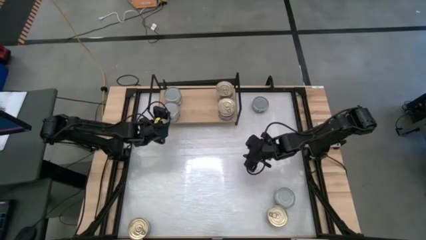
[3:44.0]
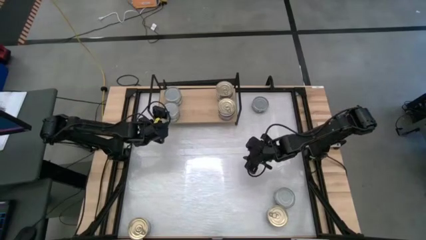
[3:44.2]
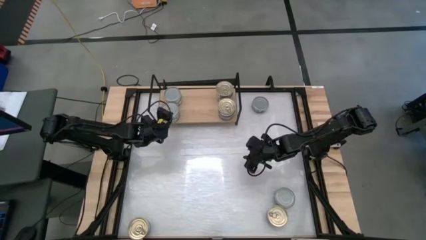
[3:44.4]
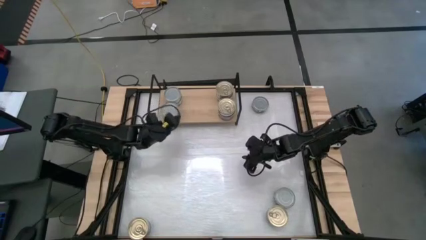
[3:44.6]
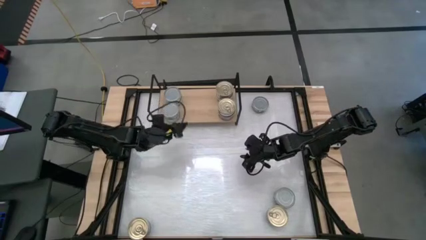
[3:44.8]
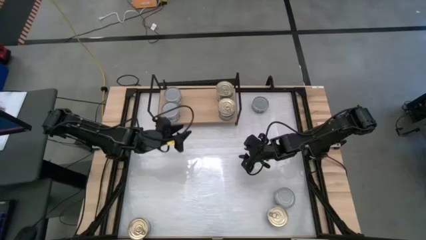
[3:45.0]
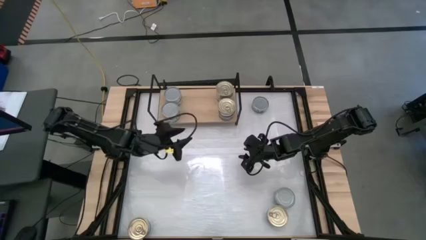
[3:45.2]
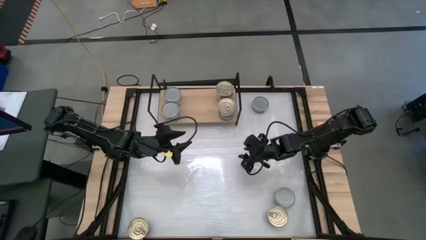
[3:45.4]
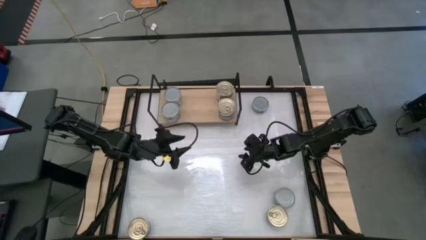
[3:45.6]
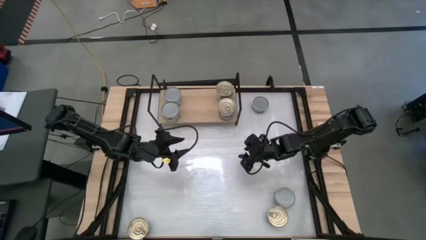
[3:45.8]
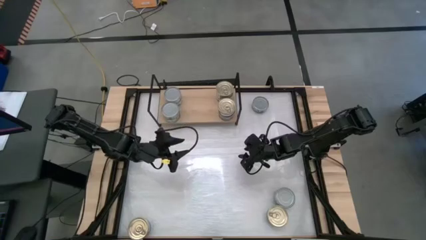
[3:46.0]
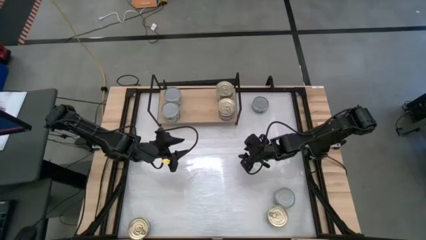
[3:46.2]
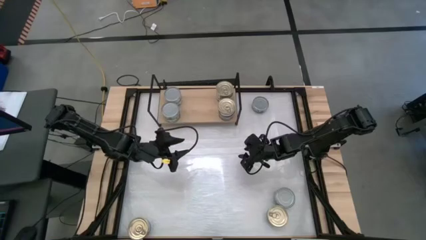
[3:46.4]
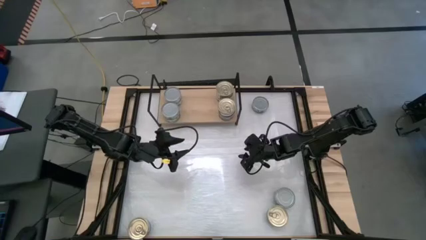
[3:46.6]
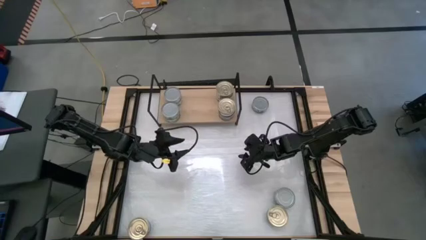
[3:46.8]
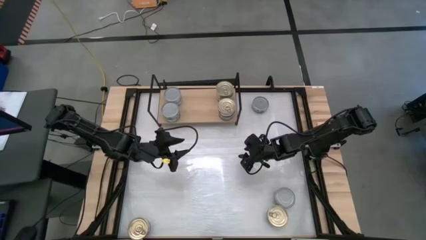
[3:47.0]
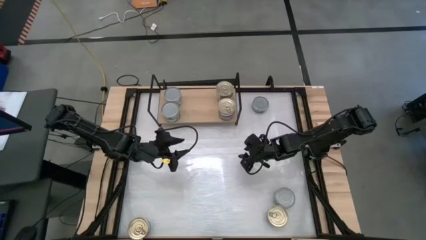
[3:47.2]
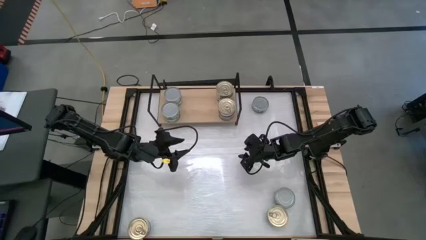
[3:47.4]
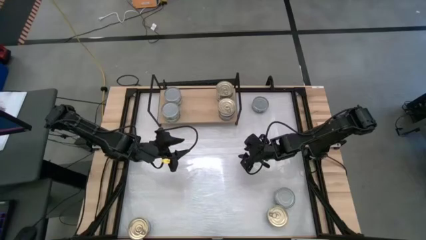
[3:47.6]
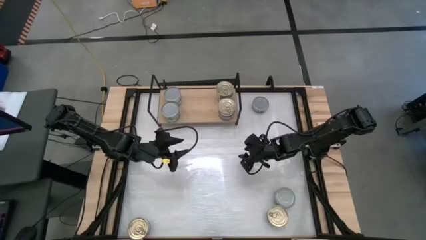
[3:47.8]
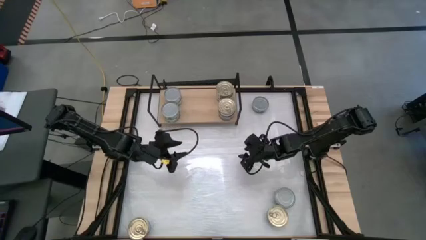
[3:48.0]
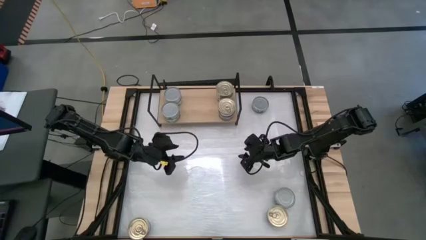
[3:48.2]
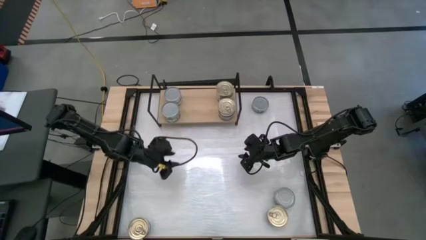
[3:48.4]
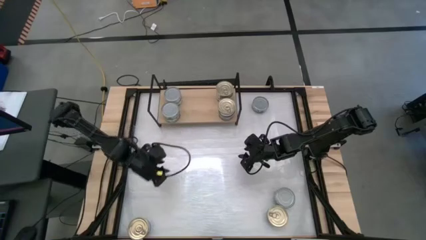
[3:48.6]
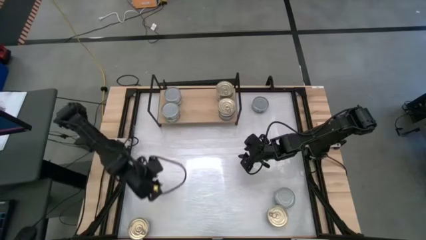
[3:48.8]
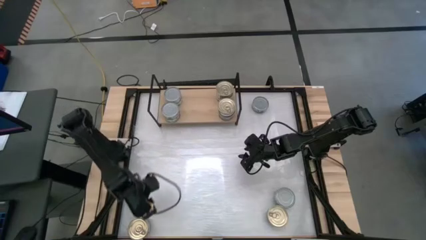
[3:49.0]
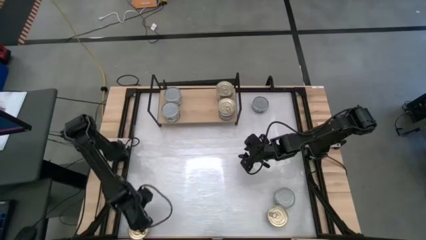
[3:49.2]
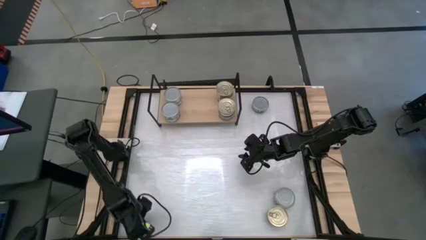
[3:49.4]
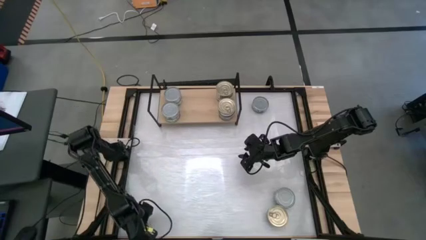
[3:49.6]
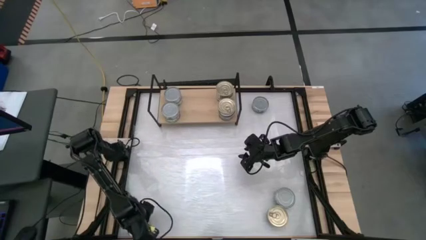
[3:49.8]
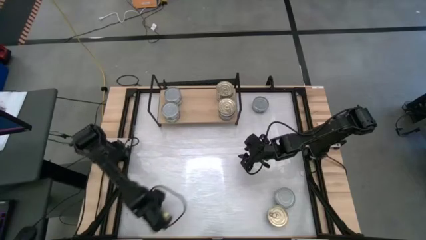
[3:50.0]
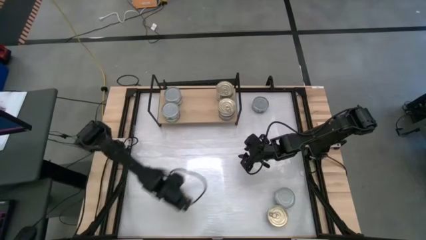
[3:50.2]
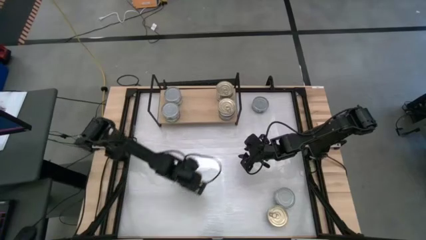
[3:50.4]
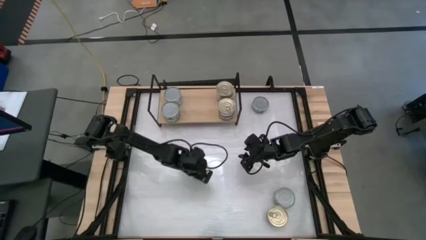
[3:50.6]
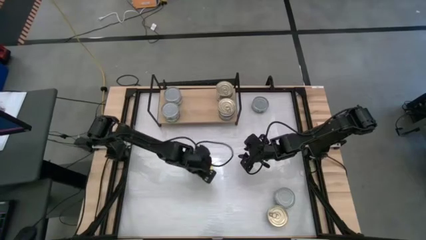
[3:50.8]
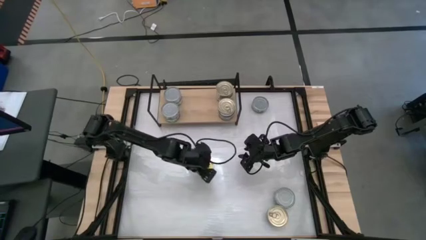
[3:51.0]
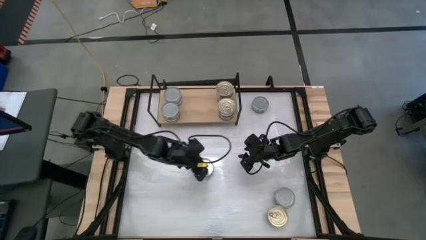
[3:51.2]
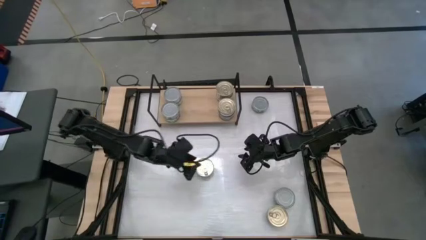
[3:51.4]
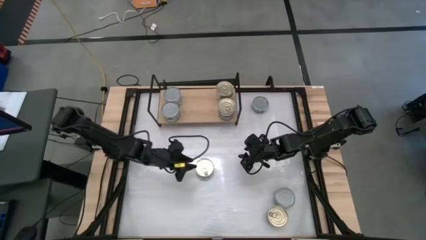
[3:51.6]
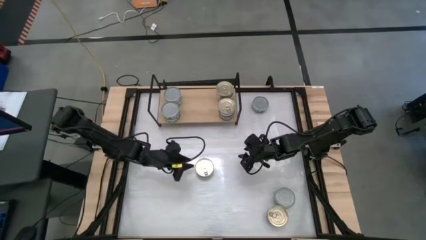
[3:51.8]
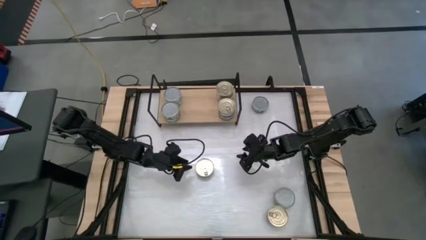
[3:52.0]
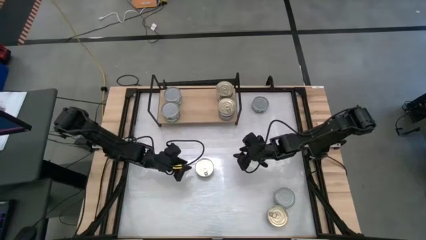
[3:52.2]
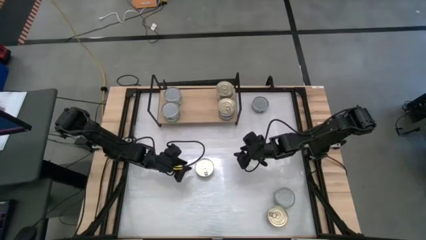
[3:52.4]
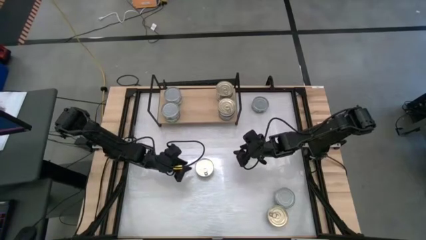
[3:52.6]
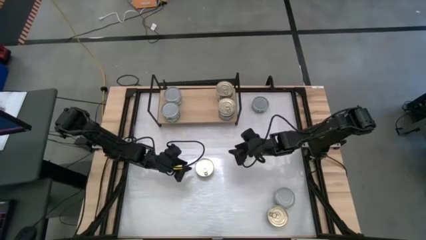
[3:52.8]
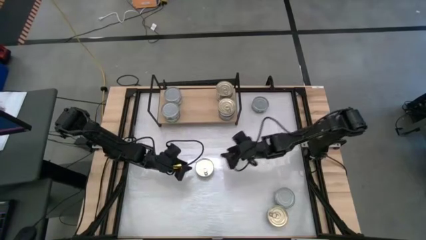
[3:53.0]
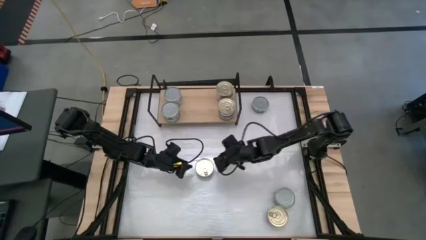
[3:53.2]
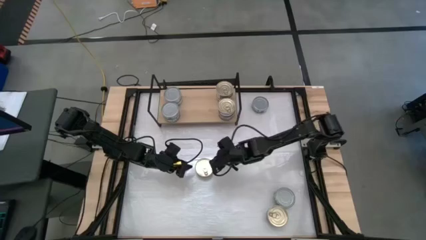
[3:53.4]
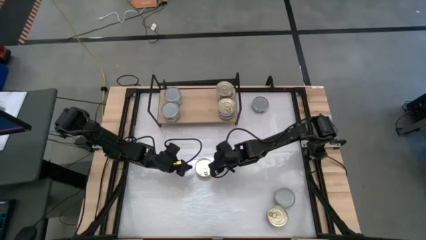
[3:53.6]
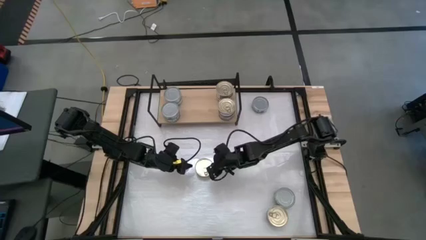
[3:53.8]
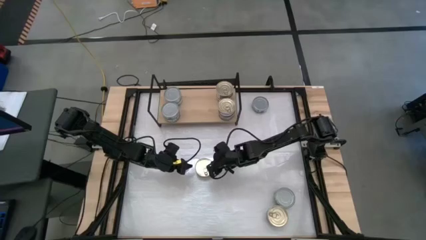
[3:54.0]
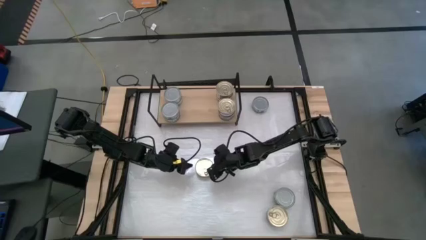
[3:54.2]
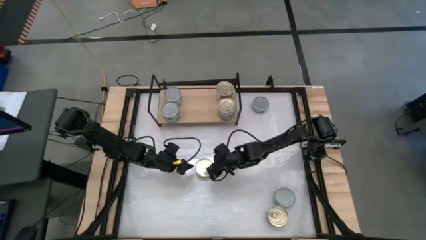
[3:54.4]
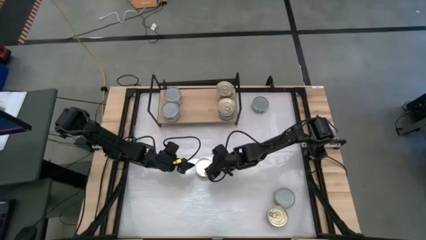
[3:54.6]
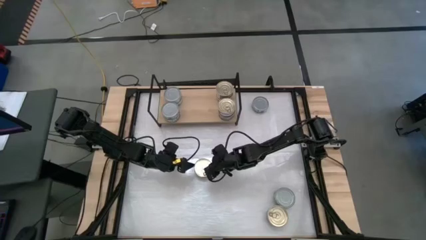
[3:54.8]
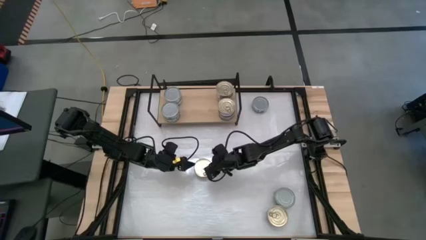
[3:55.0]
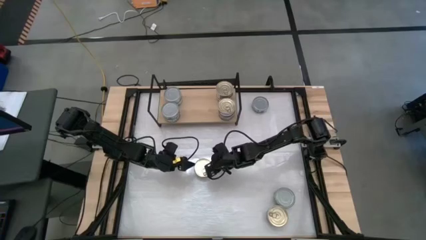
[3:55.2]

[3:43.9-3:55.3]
Task: Stack canned seafood by type on shelf
Put the blue tuna can on the shelf

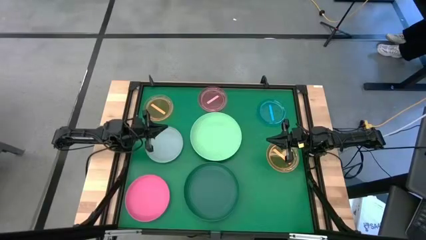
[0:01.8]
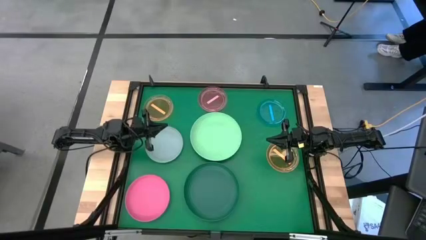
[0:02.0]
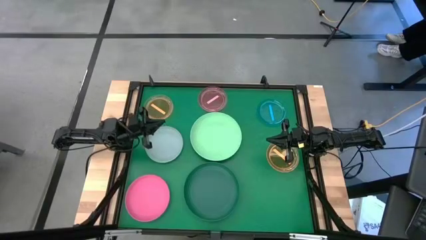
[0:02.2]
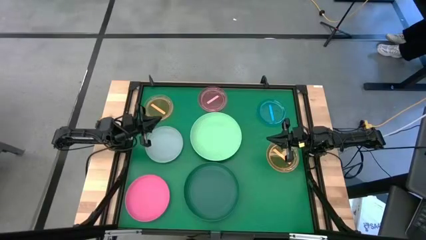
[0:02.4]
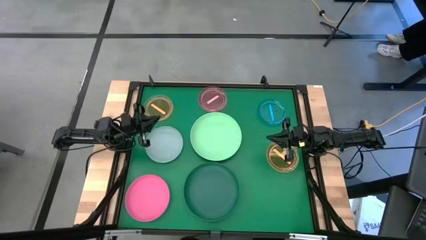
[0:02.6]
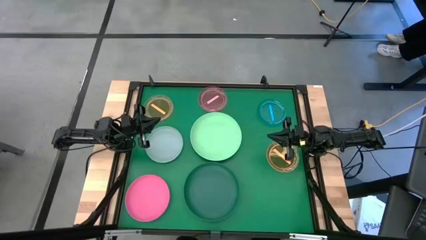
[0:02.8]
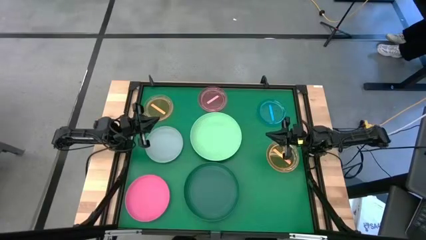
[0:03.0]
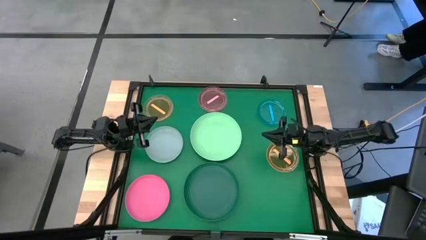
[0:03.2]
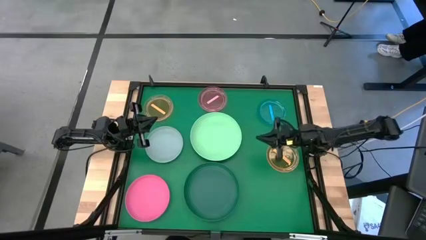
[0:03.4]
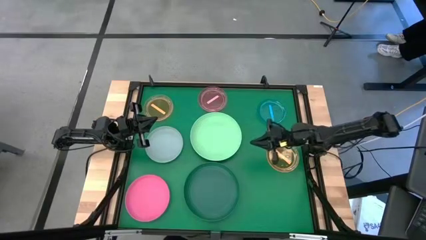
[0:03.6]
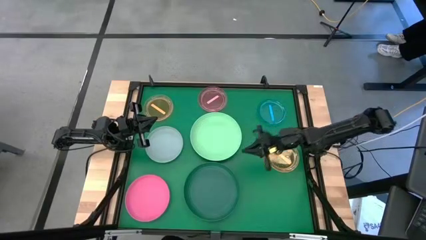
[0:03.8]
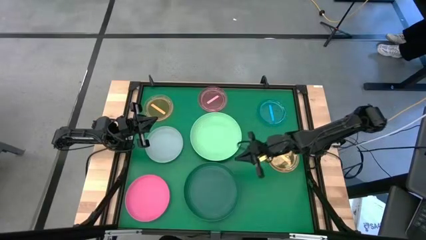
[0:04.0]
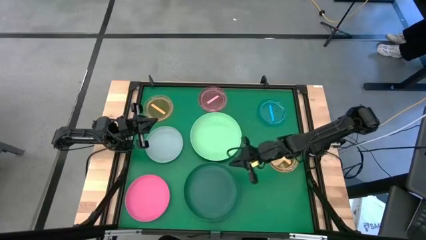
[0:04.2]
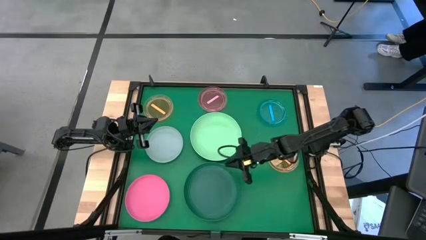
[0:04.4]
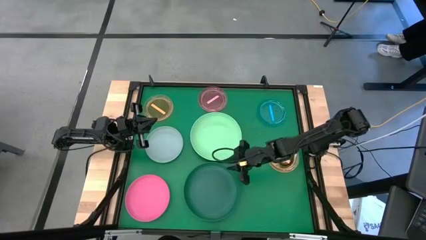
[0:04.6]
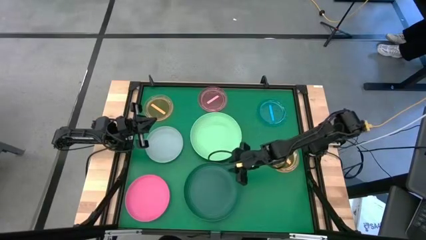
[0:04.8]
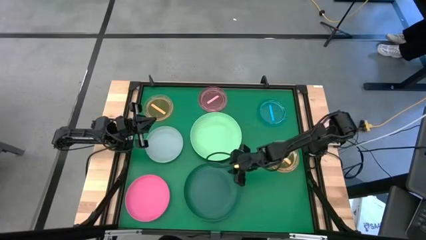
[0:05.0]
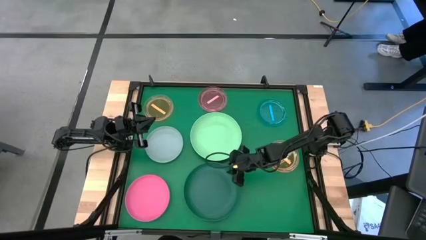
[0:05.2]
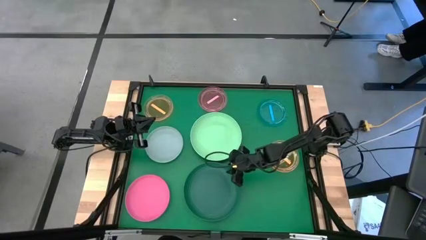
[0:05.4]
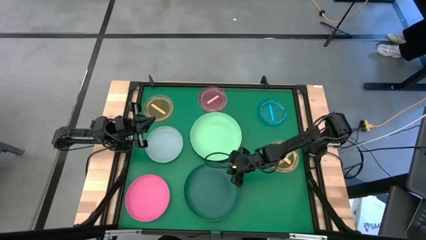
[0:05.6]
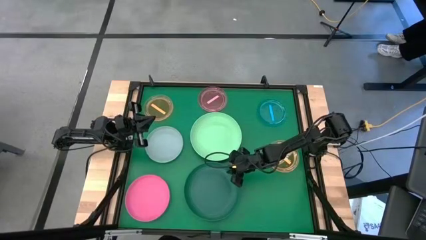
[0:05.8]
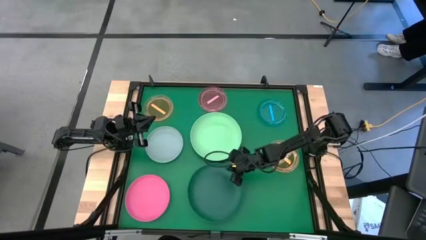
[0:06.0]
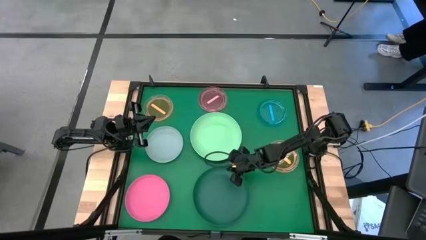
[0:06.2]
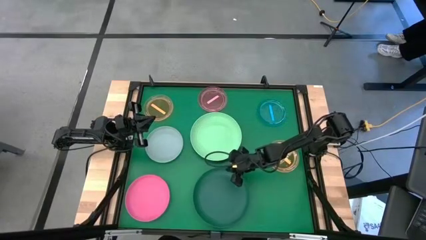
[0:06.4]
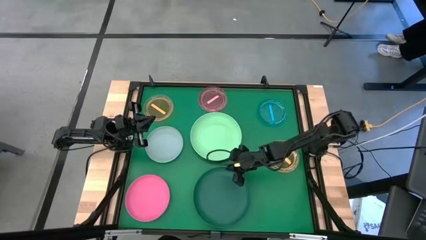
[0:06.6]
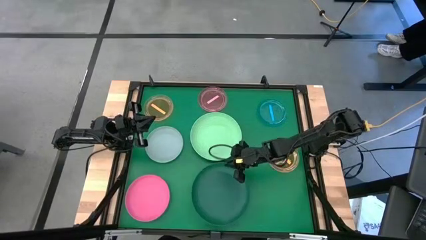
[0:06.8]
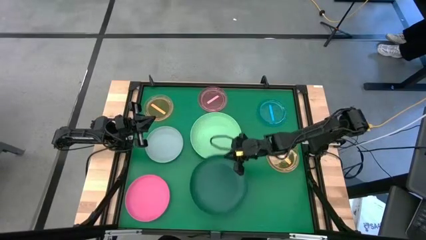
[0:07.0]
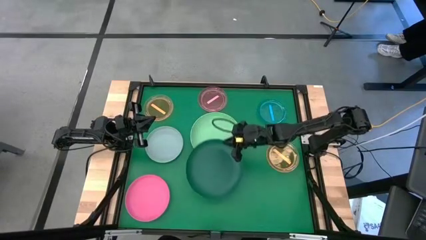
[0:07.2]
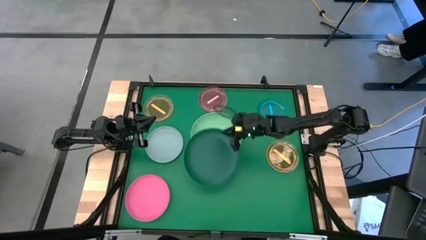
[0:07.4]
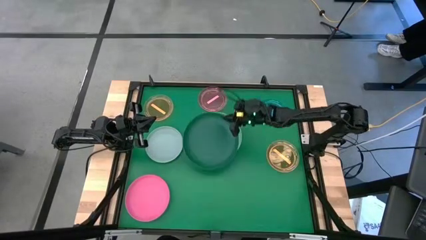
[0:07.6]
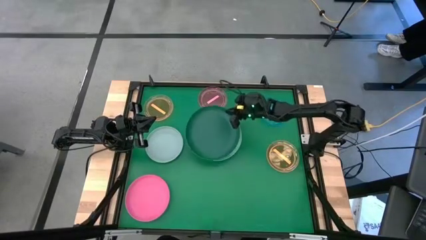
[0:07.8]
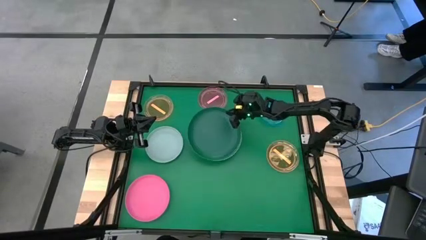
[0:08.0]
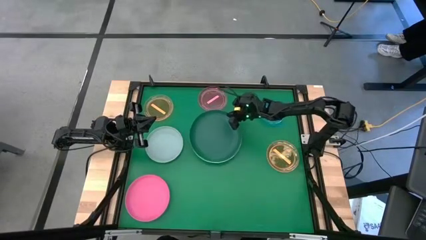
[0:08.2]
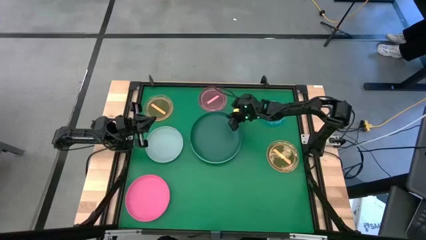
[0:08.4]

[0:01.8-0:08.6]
Task: Stack plastic plates
Stack the dark green plate on the light green plate
